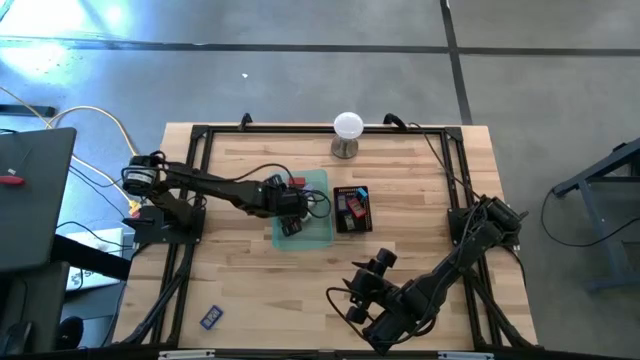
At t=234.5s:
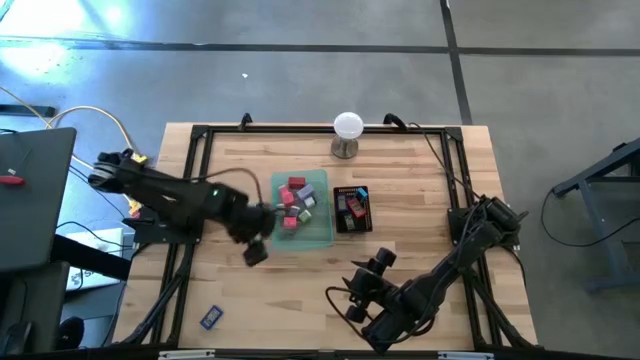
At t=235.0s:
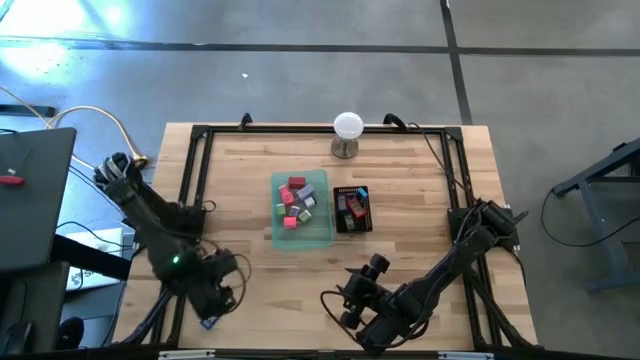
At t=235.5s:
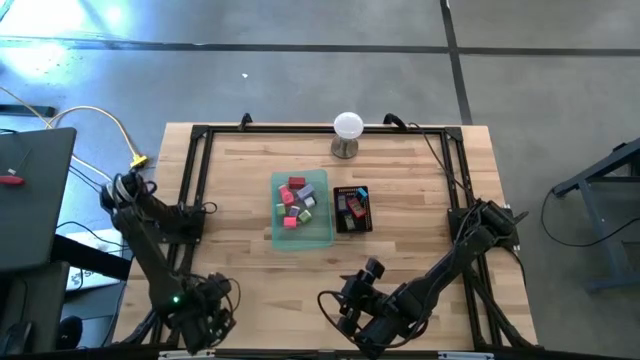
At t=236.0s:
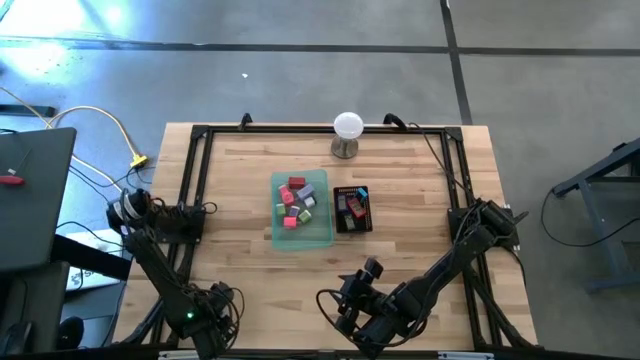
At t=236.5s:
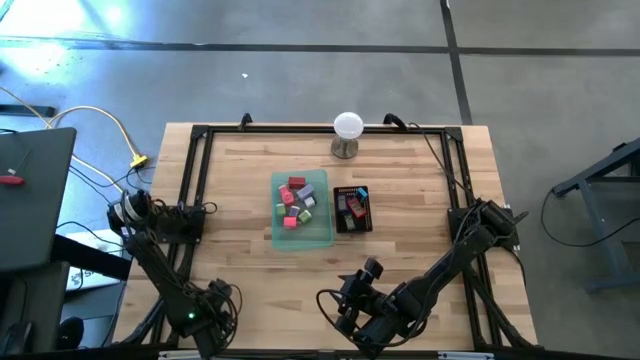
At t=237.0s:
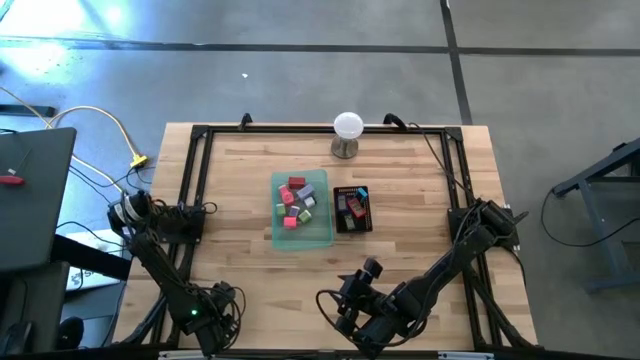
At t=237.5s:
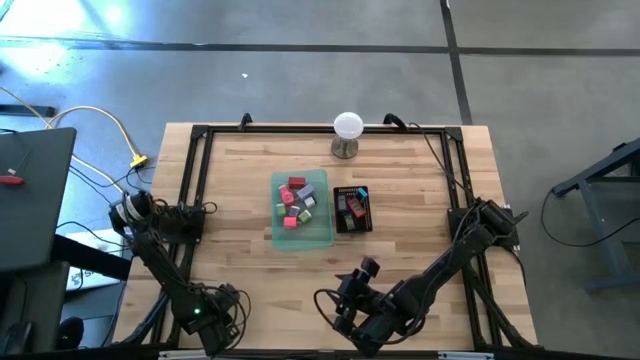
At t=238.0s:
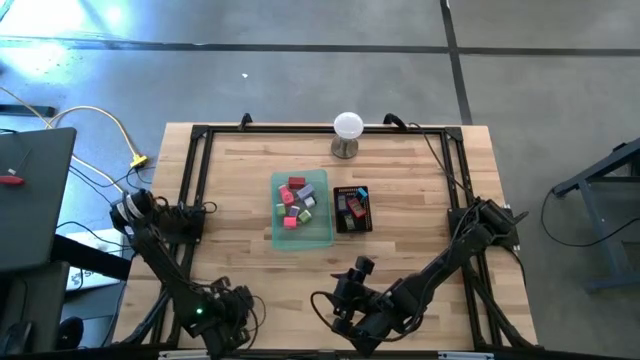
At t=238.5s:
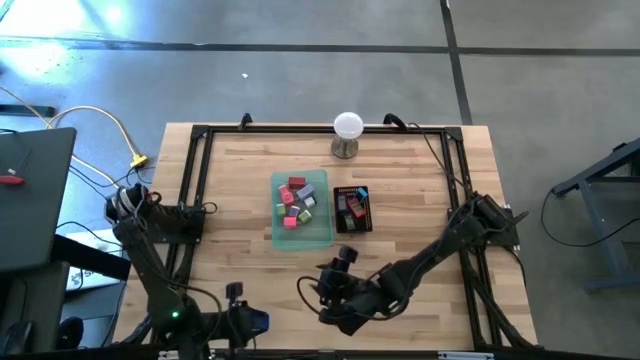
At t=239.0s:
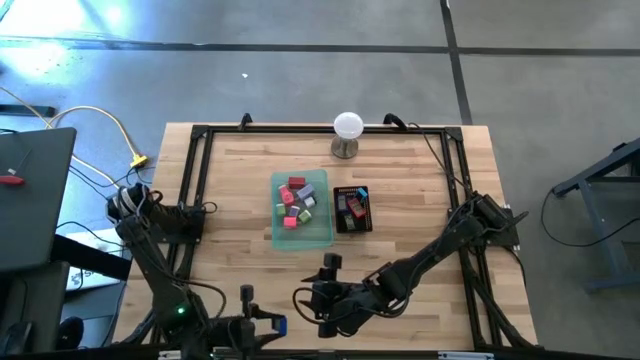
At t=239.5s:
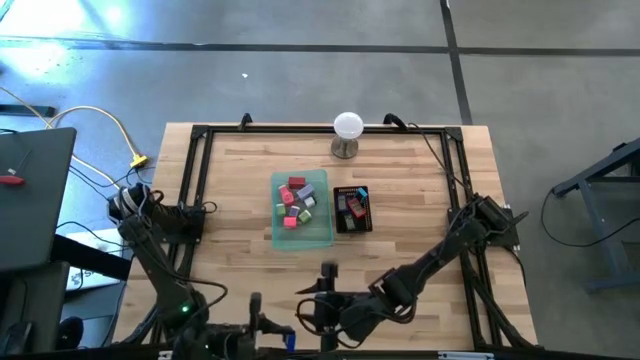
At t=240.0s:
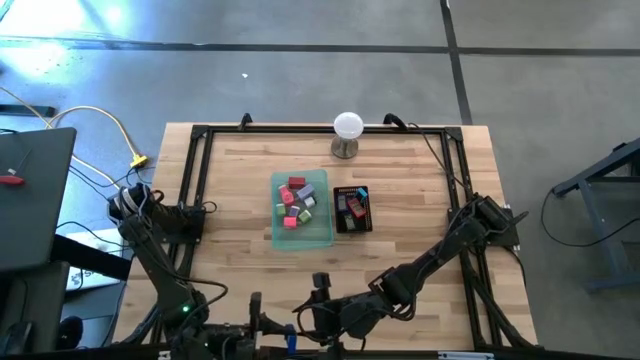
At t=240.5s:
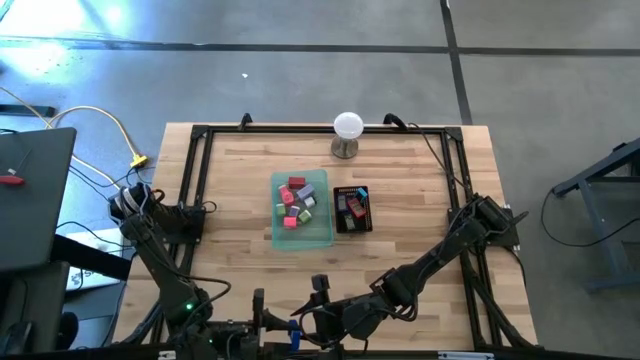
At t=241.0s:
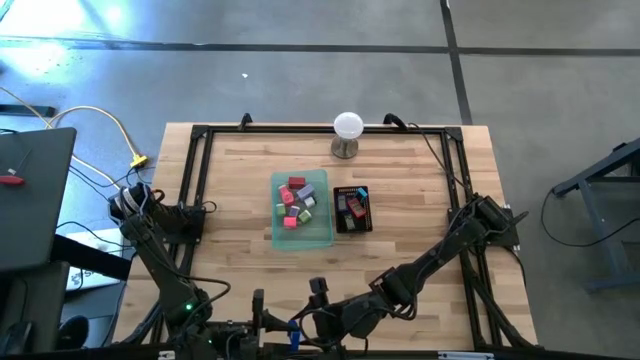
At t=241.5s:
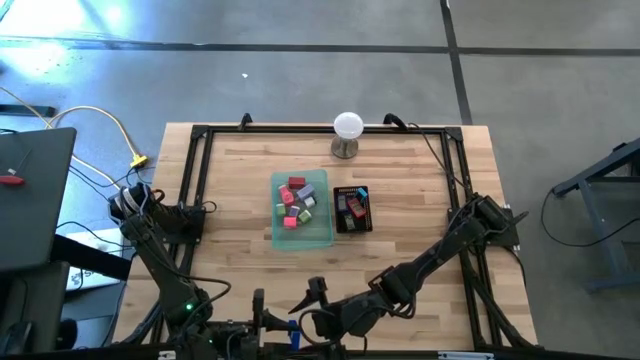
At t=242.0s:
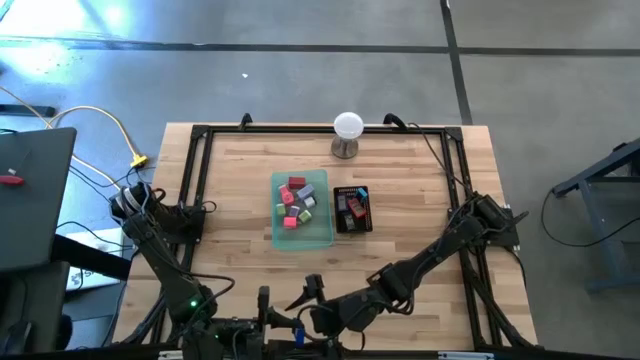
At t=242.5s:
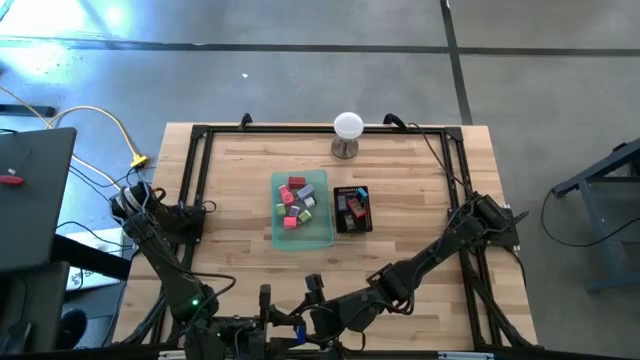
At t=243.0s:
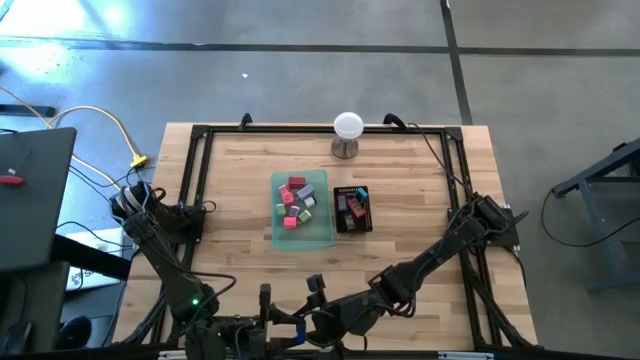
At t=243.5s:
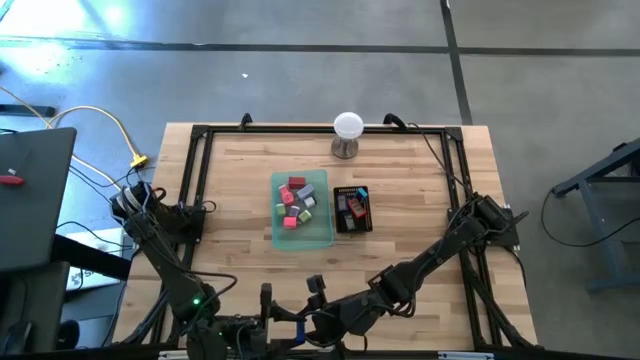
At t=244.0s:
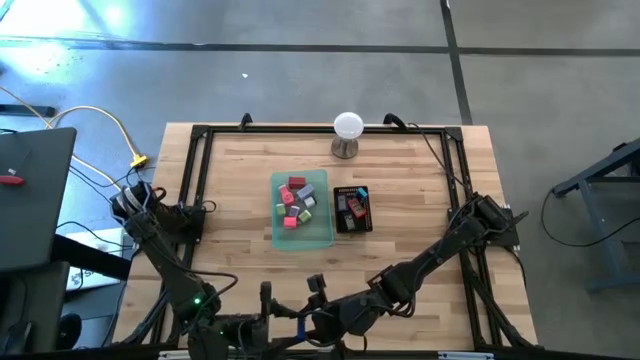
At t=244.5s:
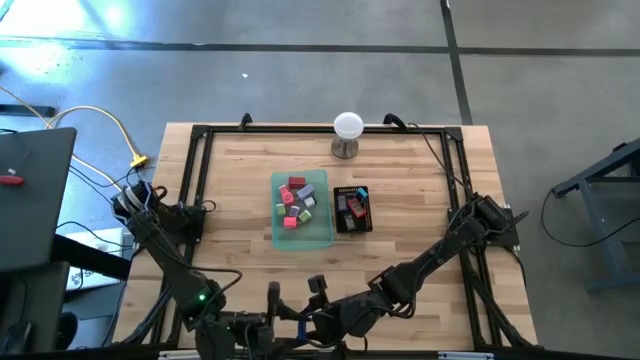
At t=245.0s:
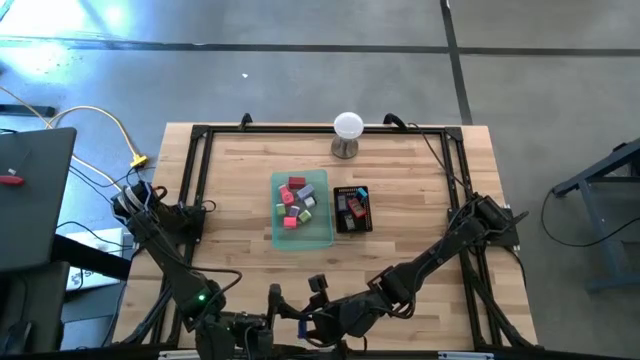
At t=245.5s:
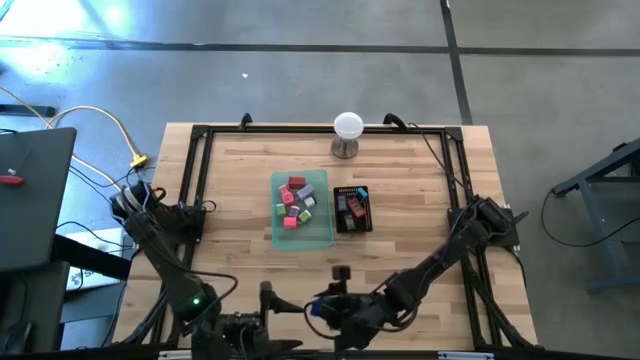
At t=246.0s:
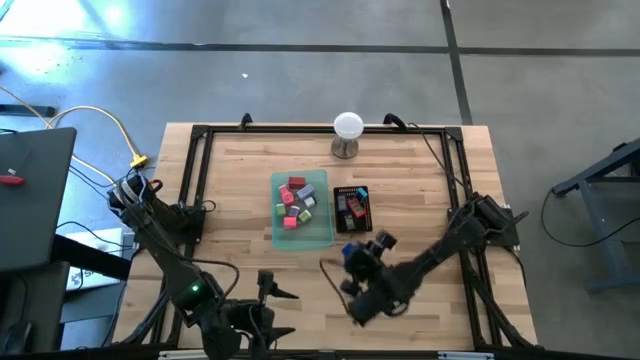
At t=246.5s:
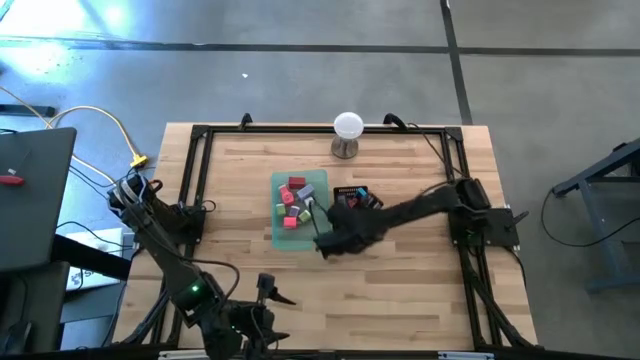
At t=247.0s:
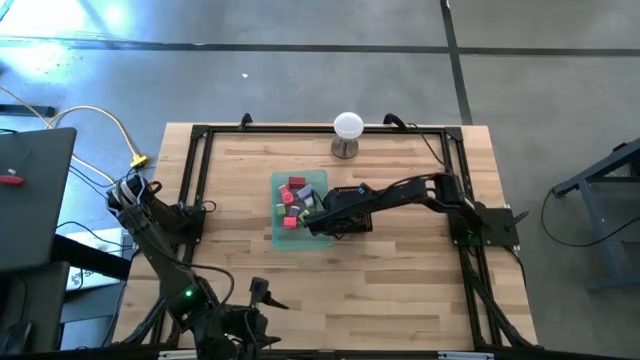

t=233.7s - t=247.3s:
Task: Pick & Place Office items
Put the blue digital clock into the black bin

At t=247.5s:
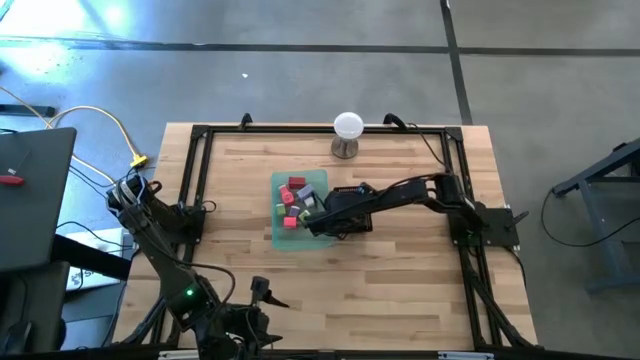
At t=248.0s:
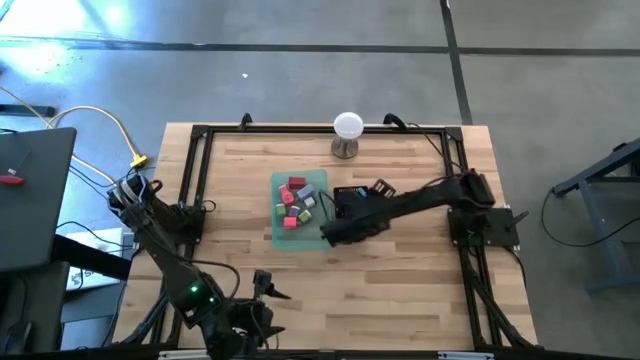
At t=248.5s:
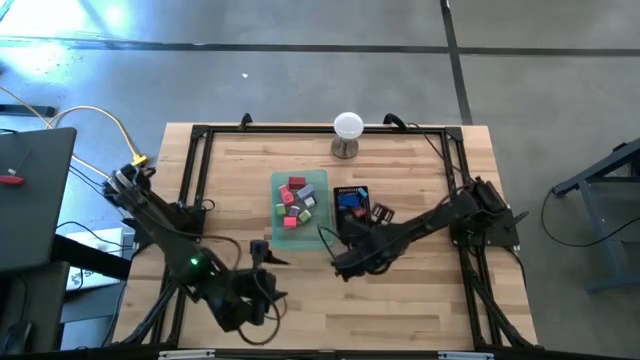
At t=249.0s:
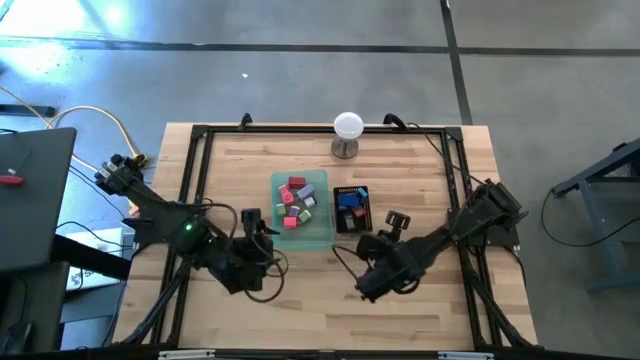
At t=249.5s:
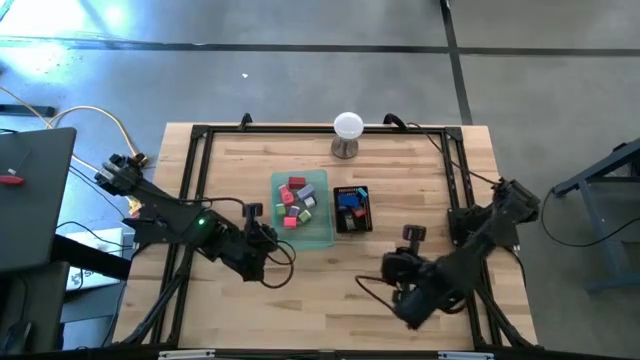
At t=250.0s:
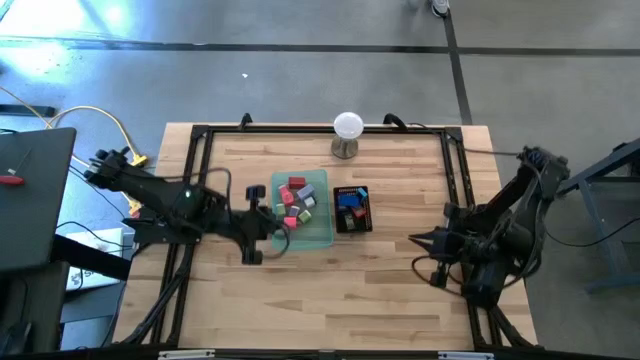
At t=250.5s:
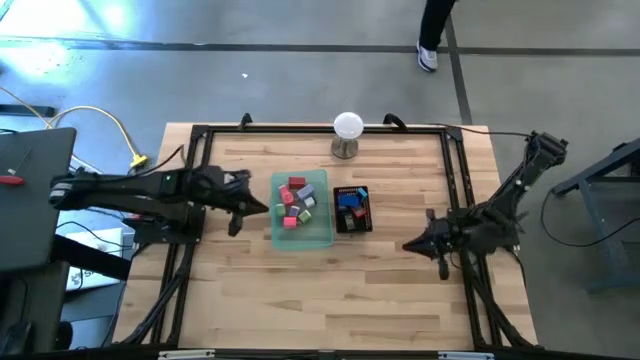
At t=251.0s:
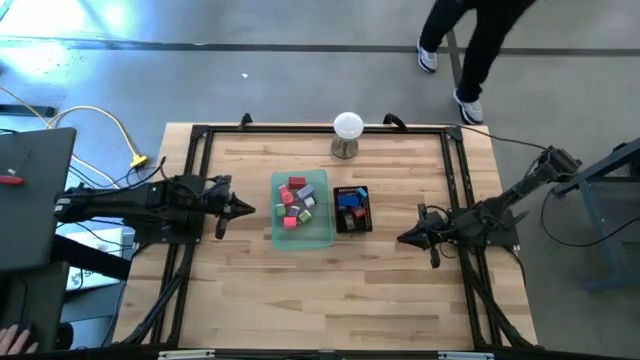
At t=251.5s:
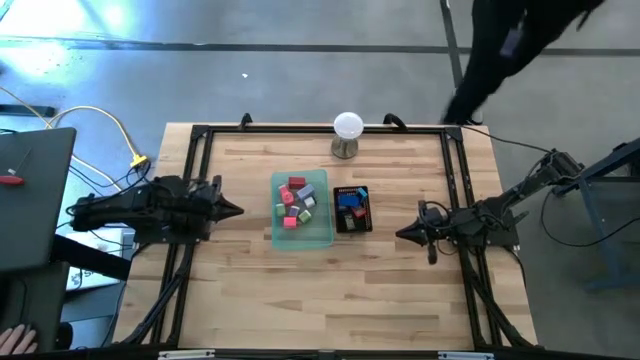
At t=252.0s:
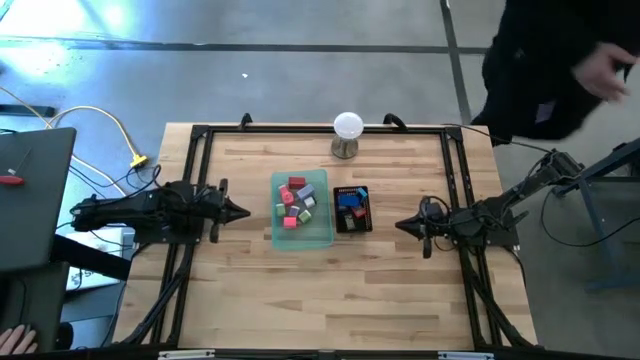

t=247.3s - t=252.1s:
Return to Home Position

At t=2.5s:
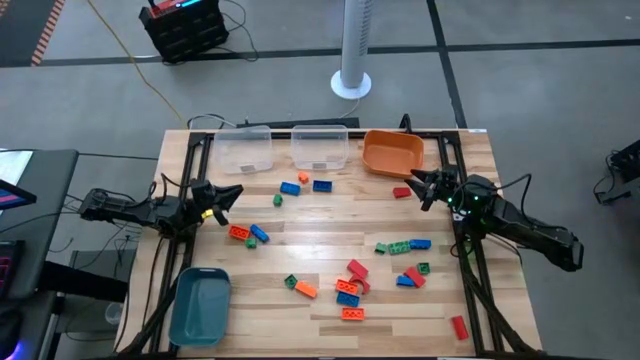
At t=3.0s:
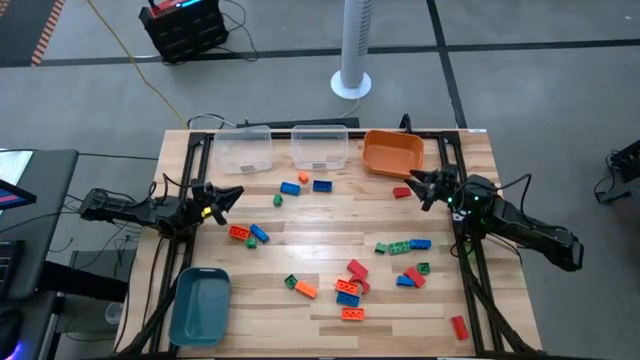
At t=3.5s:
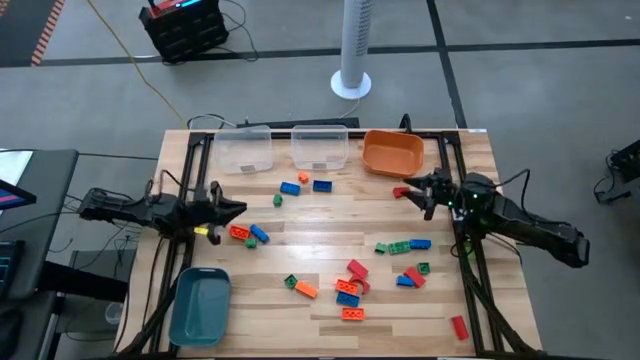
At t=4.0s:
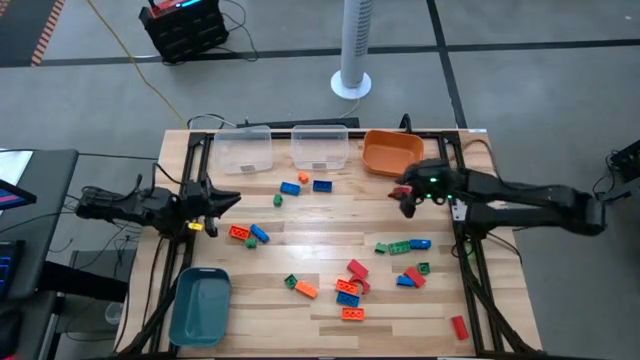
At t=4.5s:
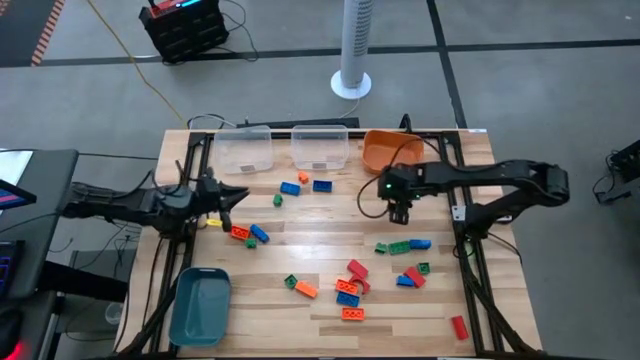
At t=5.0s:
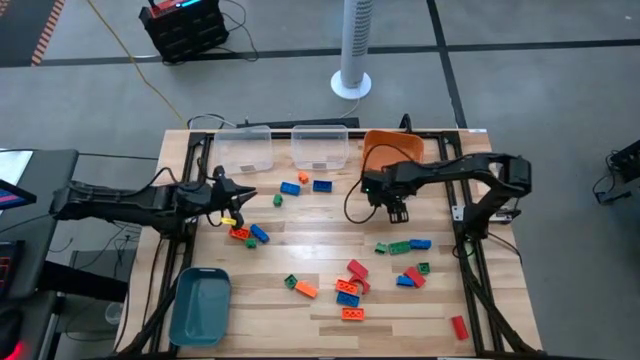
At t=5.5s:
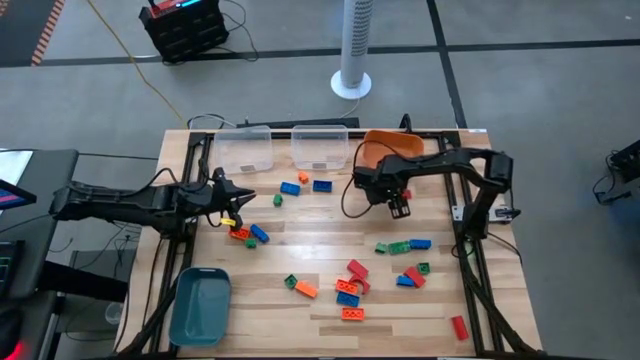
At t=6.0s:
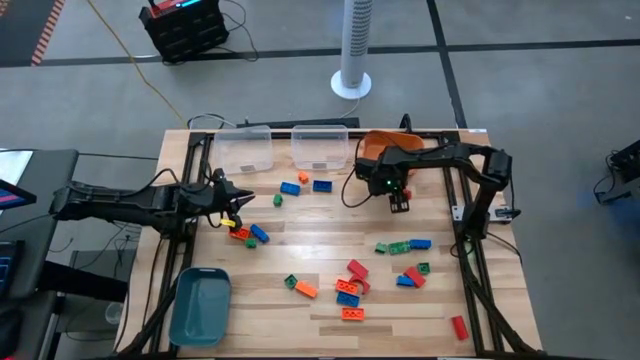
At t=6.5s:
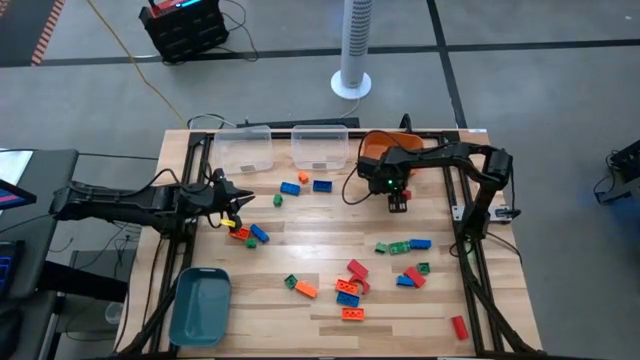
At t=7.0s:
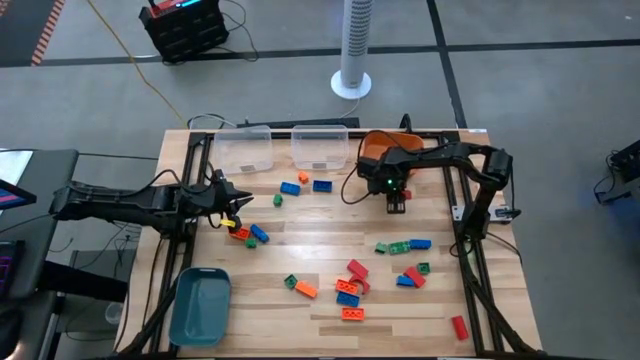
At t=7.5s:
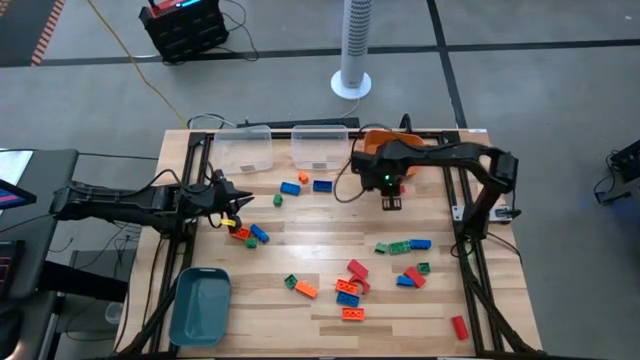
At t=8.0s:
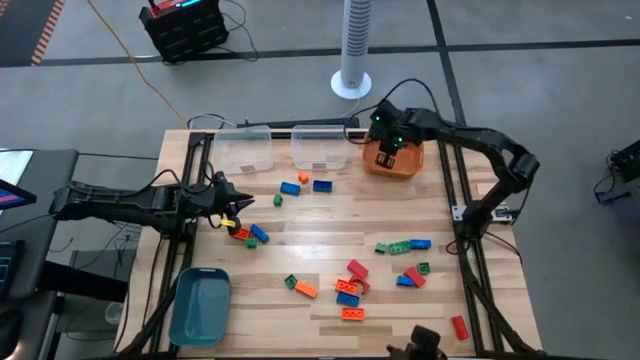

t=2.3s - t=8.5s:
Task: Sort blocks
Put the red block into the orange bin
